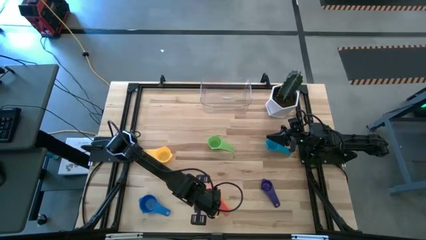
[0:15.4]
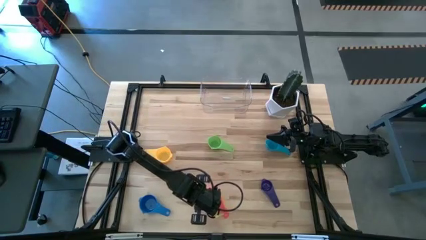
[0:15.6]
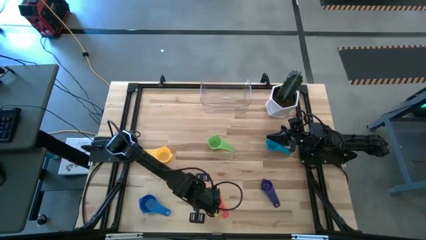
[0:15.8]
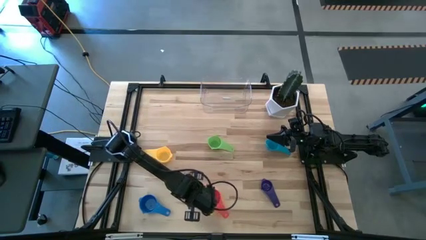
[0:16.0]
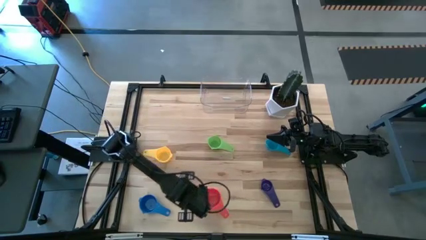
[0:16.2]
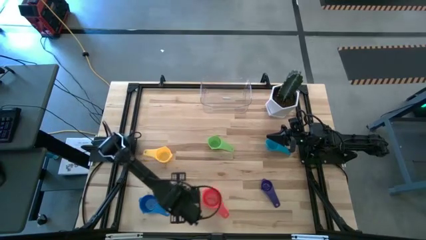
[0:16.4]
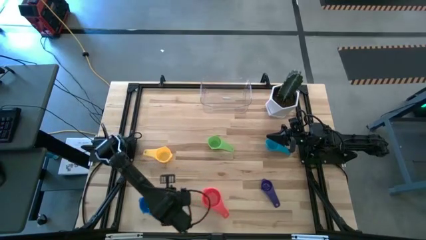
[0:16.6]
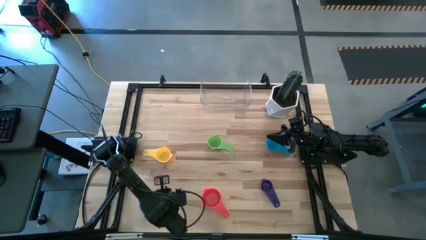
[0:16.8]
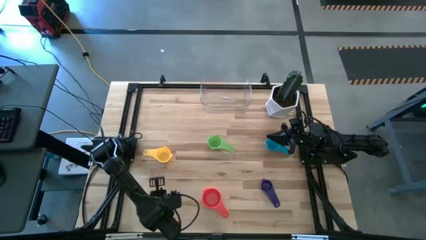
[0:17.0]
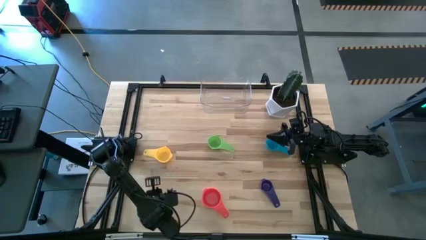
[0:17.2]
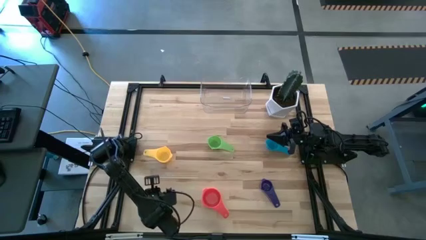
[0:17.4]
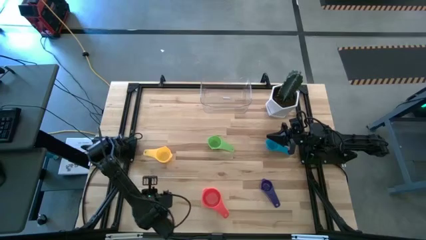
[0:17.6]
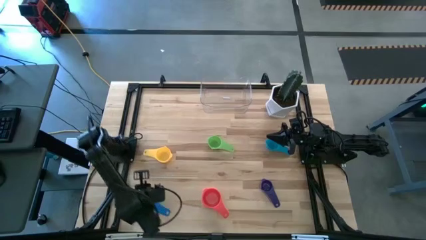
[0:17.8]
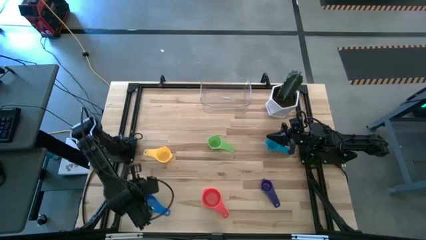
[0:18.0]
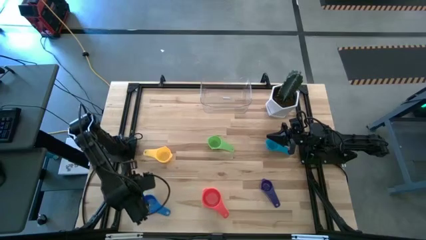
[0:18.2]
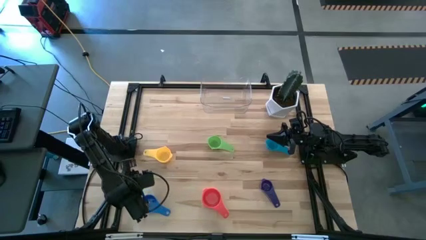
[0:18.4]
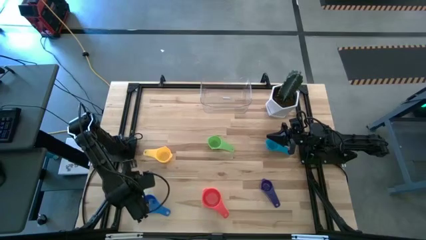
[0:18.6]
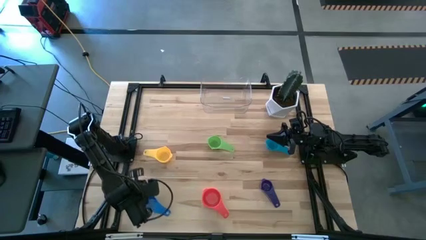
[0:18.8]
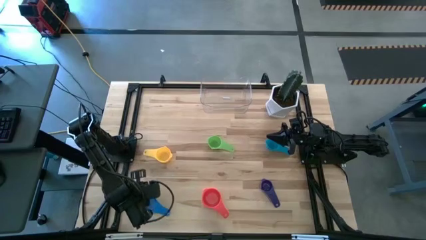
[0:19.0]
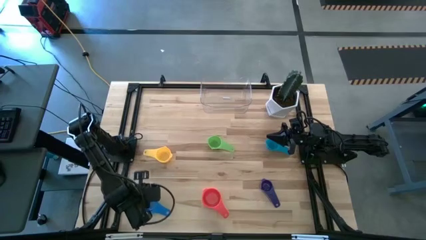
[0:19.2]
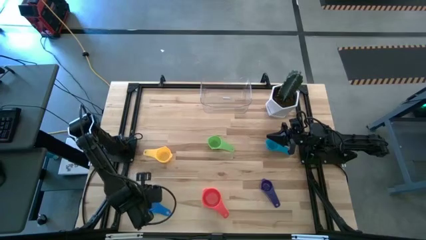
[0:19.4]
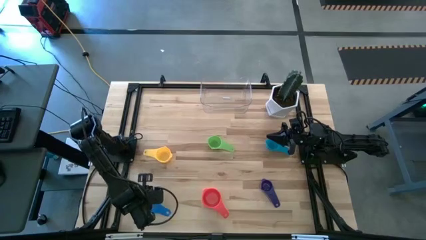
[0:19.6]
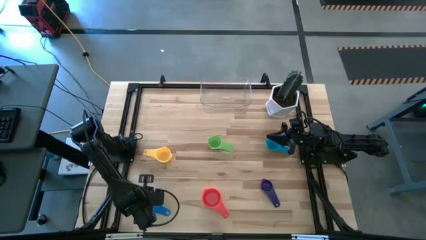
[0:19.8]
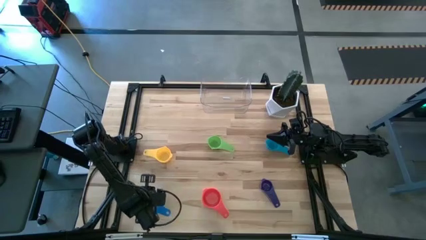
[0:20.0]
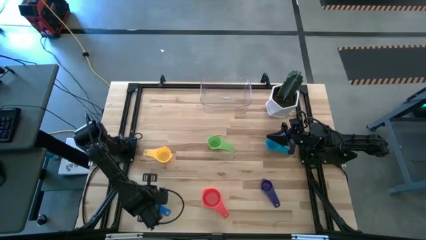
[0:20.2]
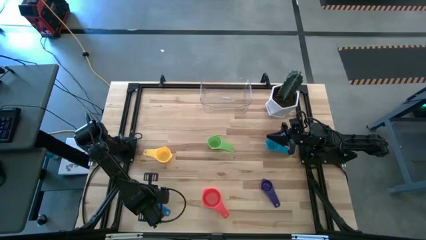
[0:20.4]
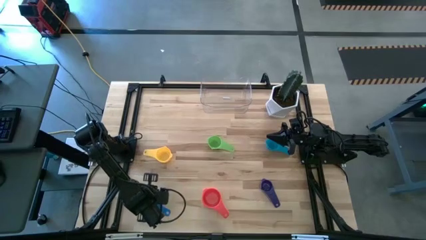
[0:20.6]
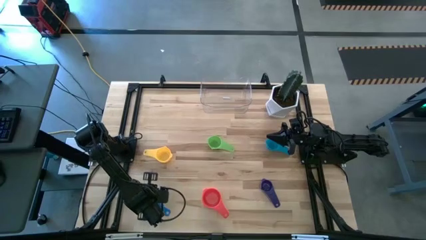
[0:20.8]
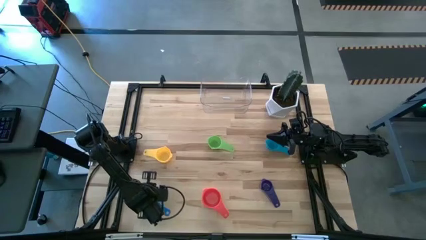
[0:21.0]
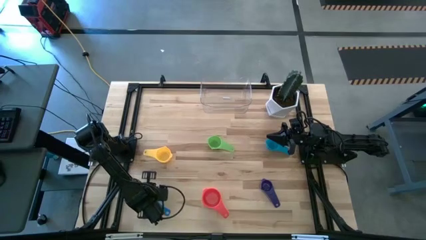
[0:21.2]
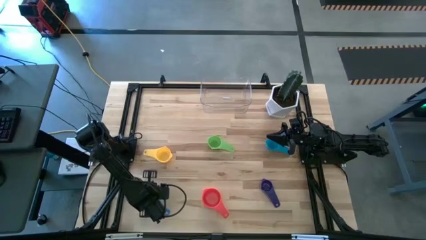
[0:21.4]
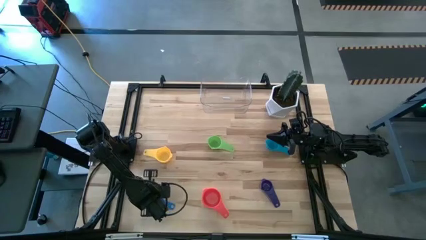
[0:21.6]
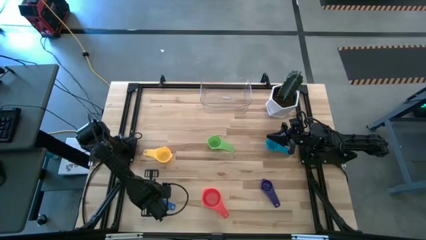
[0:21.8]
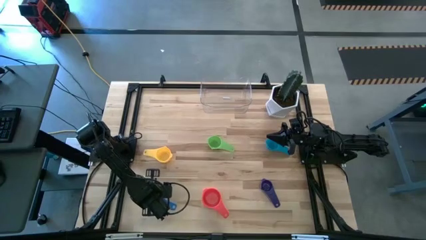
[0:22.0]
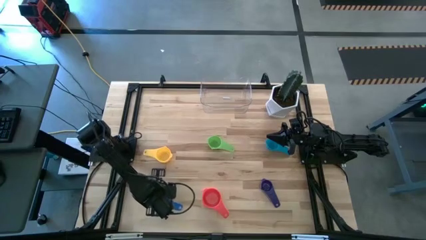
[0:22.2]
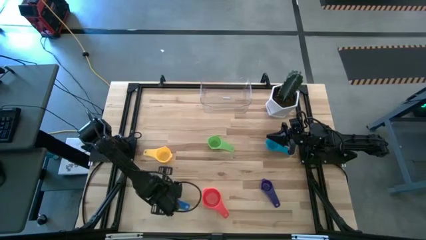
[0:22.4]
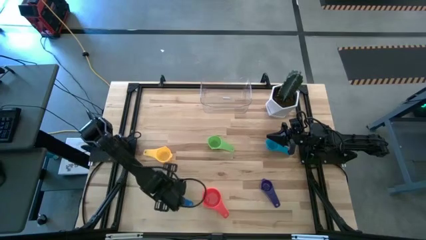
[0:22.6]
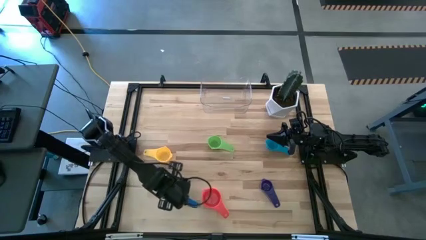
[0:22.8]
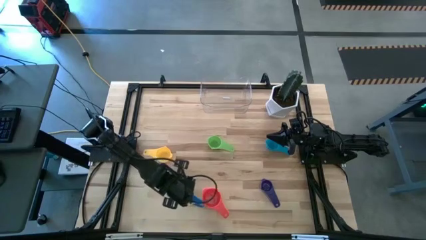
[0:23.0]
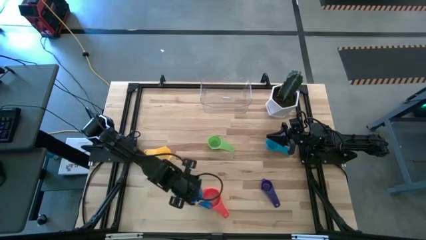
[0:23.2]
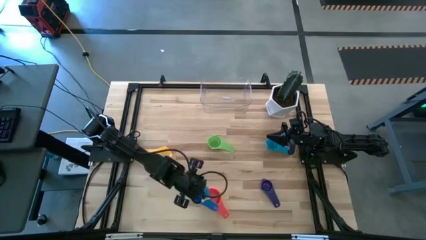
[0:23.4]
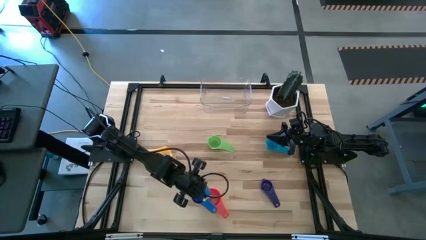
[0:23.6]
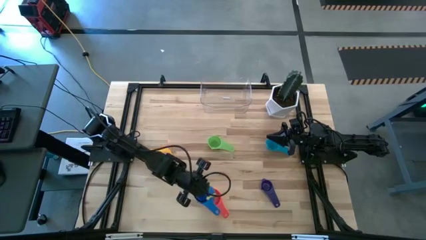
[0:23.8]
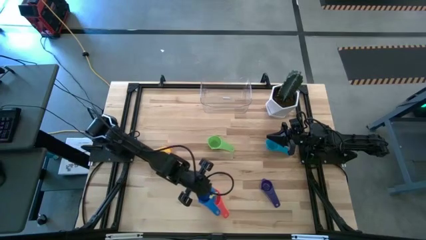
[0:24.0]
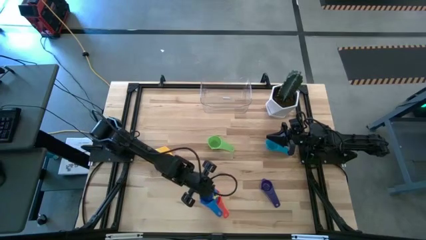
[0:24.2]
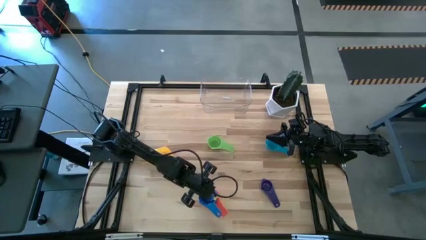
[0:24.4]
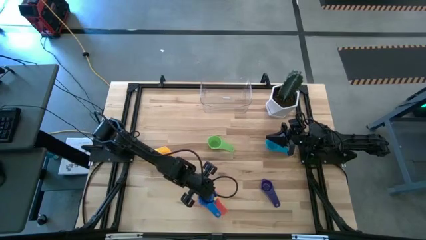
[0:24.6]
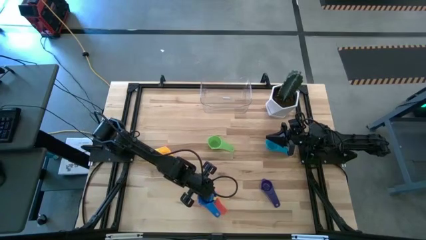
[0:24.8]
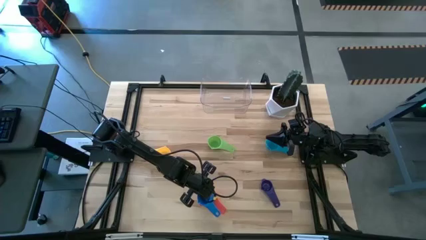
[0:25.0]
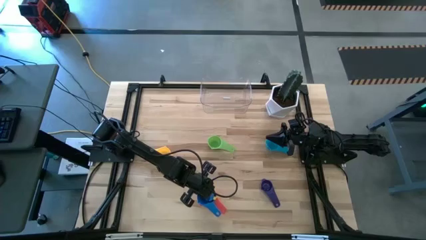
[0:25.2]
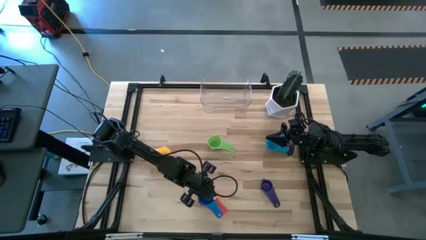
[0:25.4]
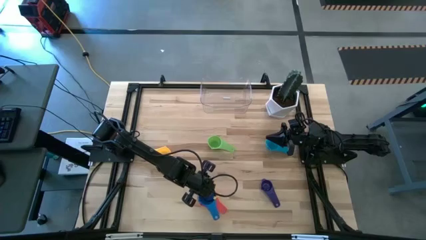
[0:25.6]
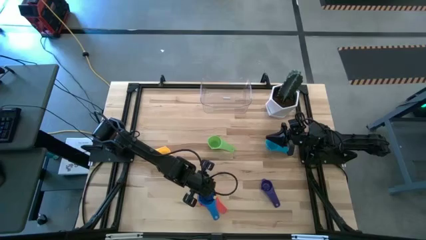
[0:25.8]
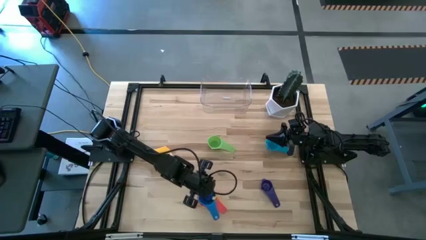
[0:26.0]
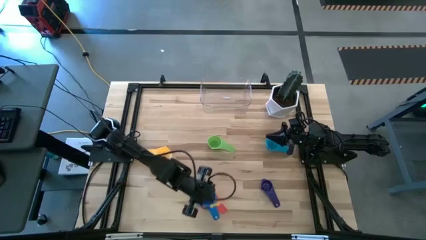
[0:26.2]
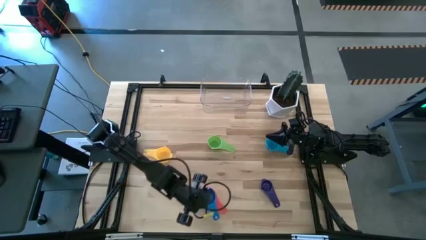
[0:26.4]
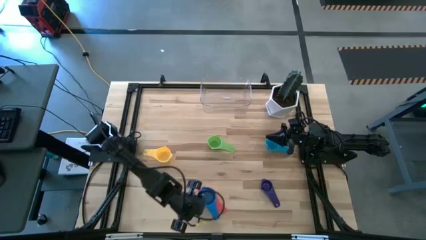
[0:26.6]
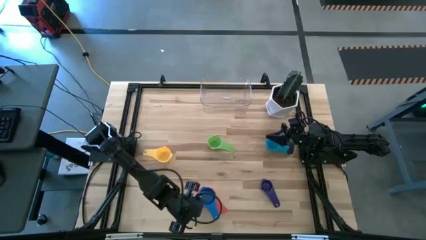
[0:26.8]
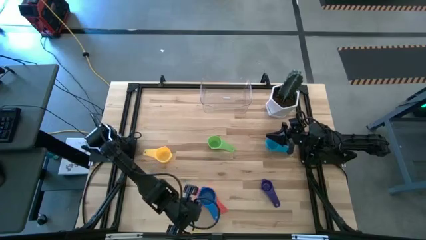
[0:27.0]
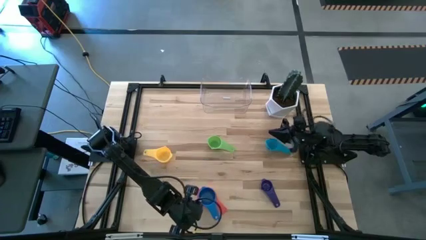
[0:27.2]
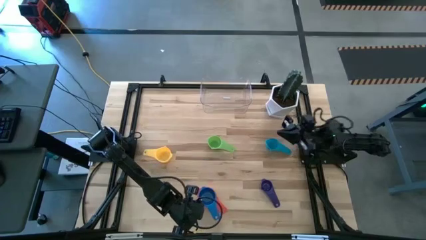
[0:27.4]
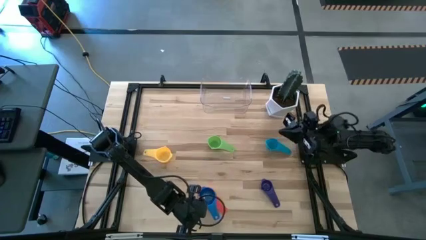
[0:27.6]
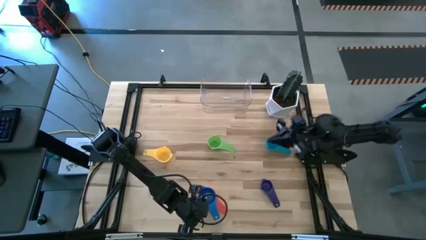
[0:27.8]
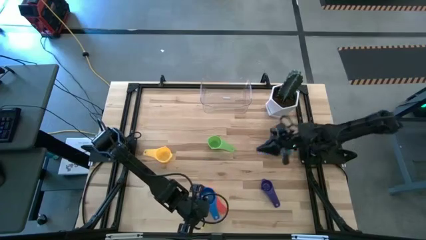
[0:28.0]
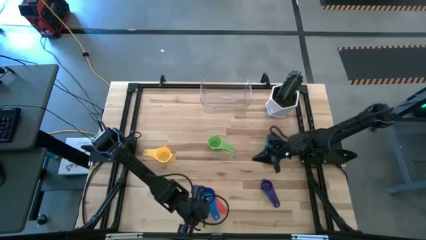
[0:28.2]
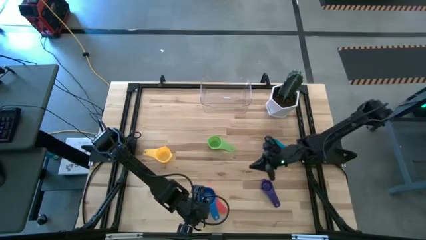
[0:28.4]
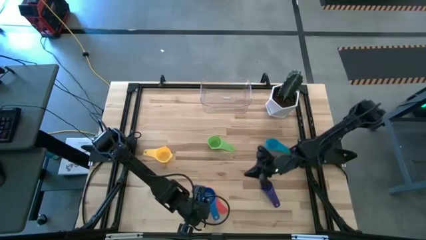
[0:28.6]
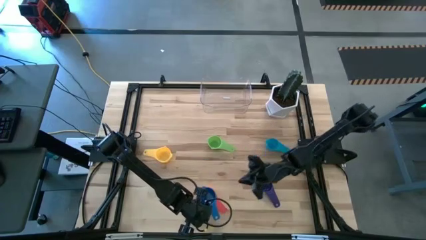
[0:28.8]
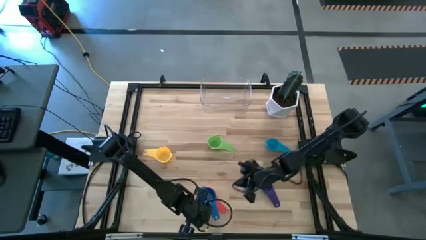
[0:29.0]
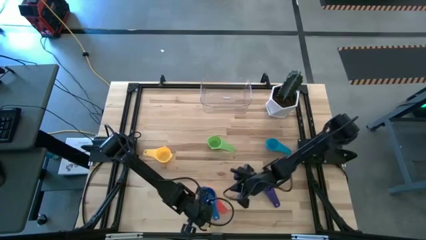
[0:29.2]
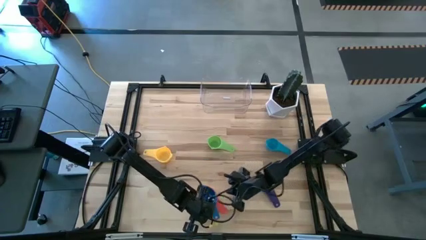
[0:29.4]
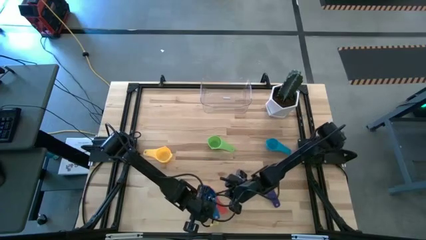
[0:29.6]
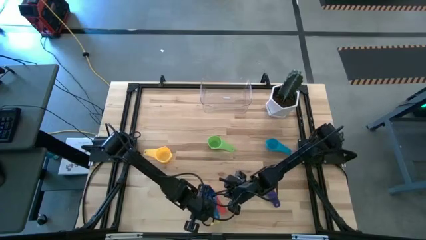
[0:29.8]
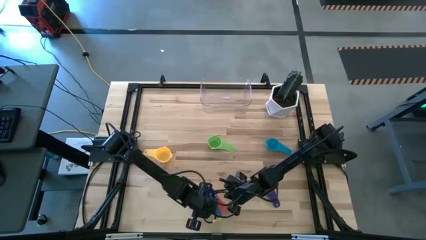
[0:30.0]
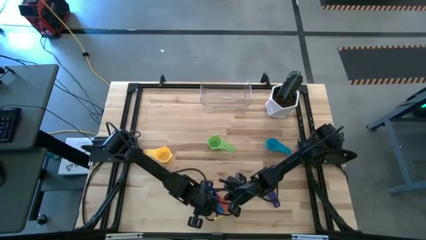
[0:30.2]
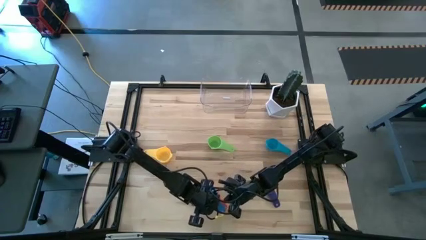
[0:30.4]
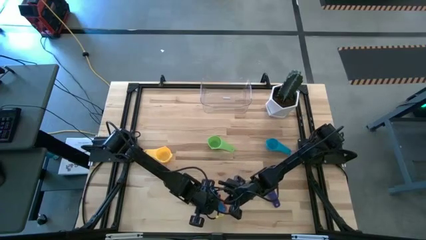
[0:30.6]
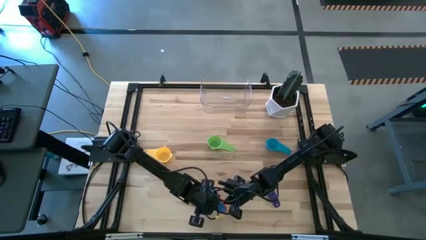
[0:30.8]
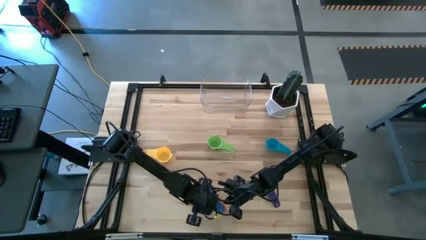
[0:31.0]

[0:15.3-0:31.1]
Task: Nest measuring cups in basket
Stack the blue measuring cup on top of the red measuring cup
